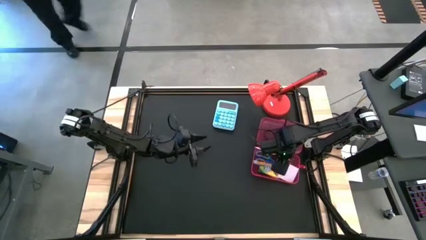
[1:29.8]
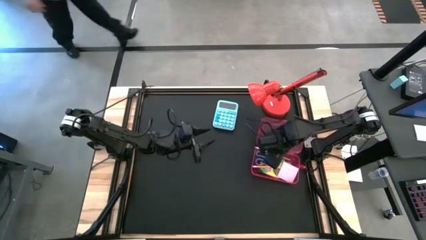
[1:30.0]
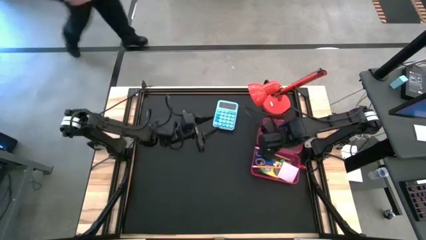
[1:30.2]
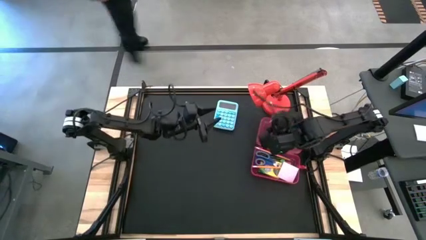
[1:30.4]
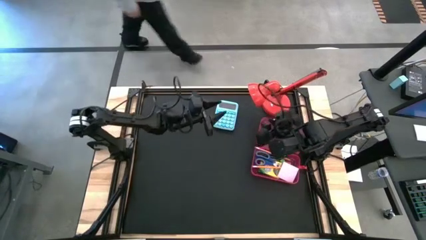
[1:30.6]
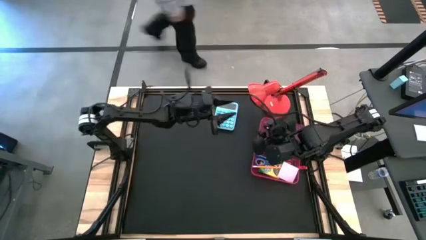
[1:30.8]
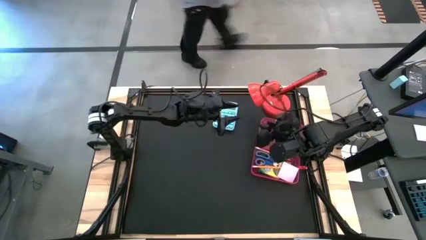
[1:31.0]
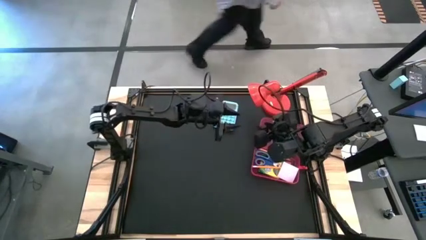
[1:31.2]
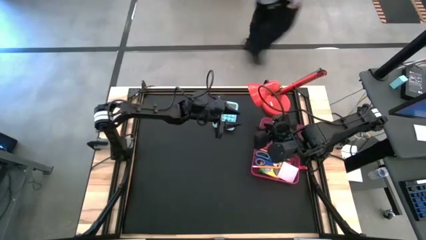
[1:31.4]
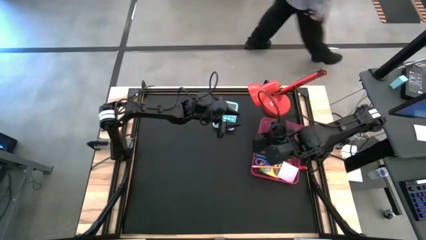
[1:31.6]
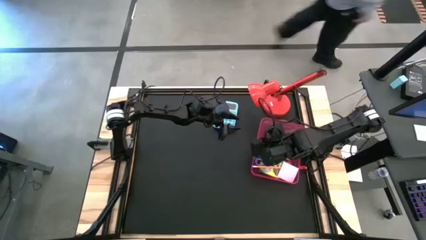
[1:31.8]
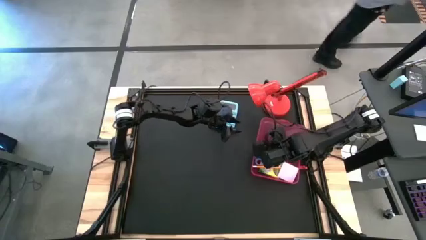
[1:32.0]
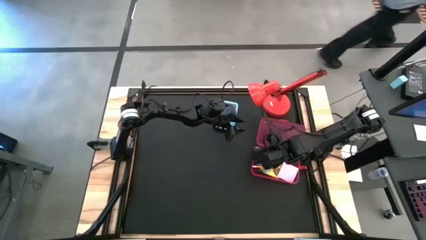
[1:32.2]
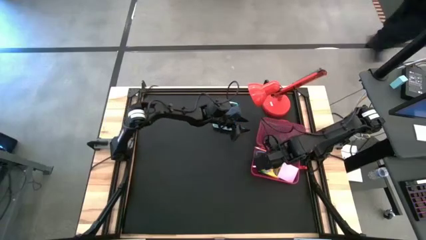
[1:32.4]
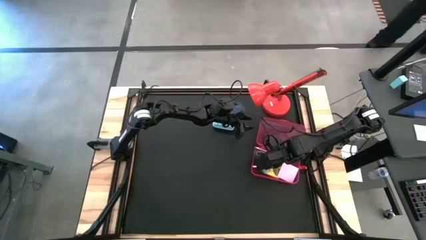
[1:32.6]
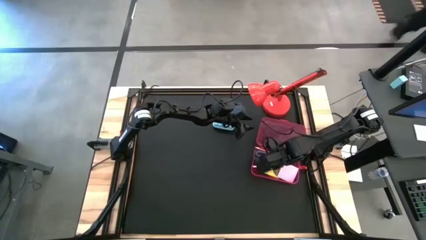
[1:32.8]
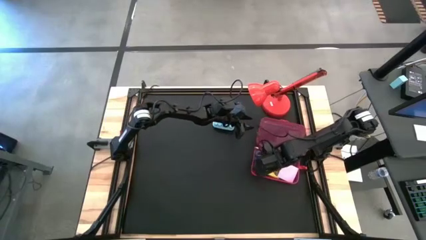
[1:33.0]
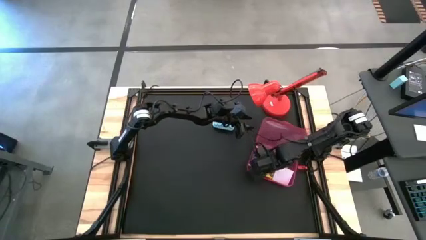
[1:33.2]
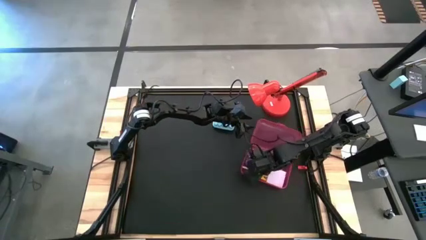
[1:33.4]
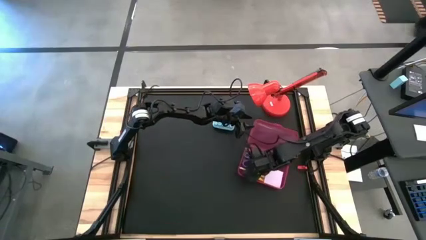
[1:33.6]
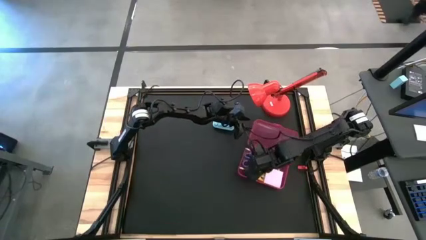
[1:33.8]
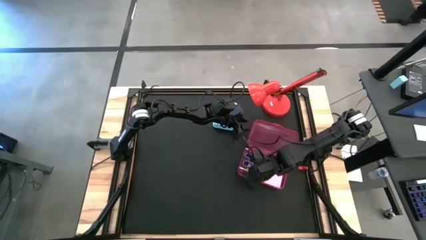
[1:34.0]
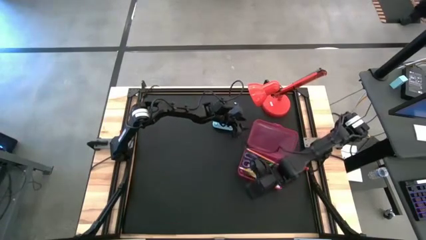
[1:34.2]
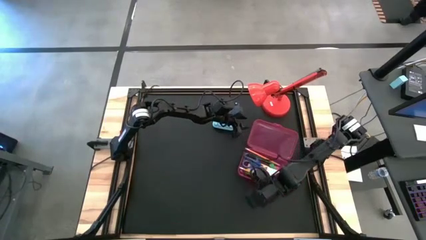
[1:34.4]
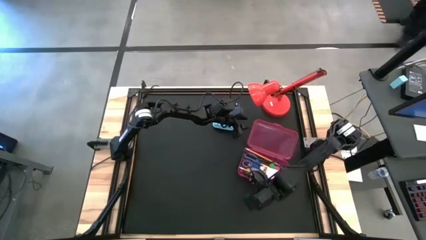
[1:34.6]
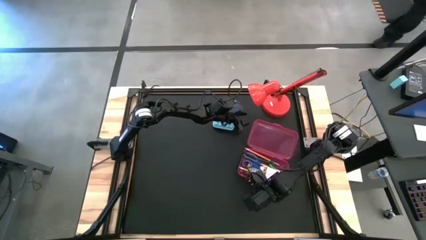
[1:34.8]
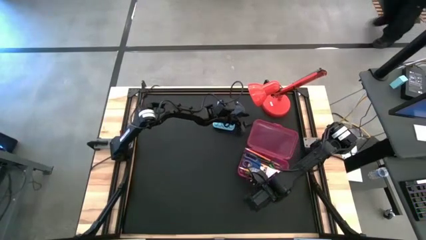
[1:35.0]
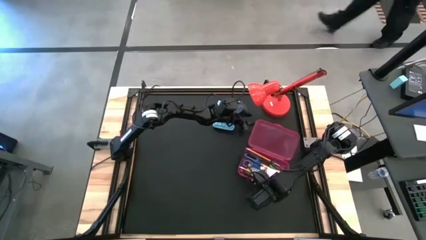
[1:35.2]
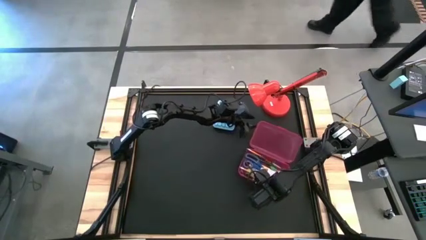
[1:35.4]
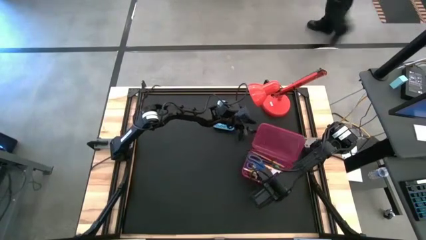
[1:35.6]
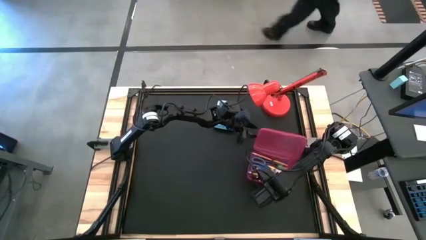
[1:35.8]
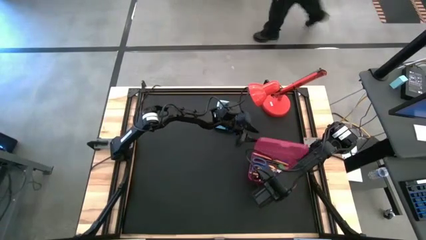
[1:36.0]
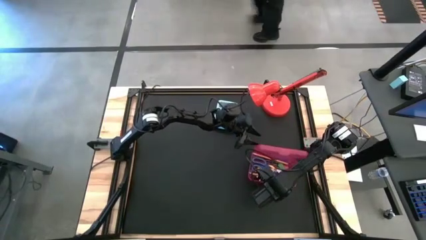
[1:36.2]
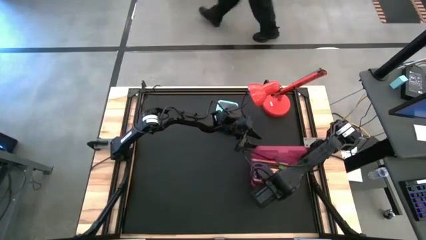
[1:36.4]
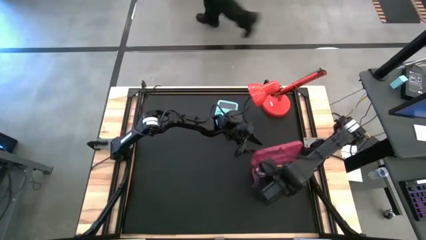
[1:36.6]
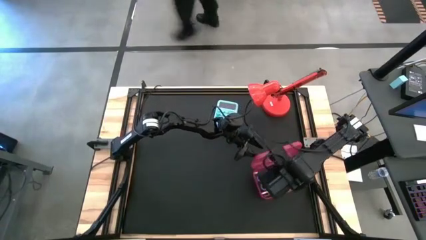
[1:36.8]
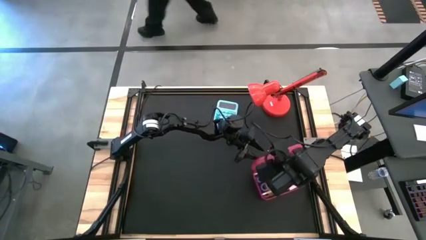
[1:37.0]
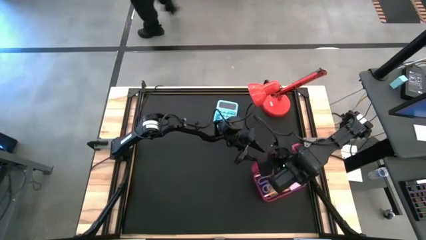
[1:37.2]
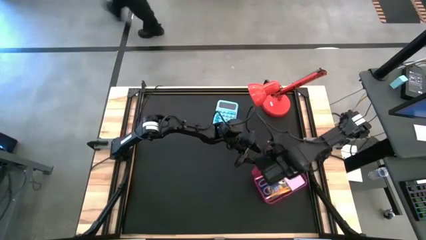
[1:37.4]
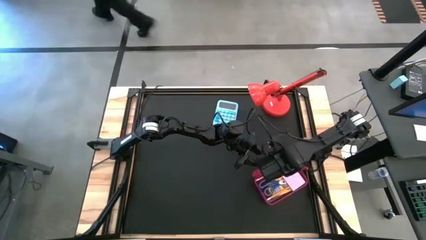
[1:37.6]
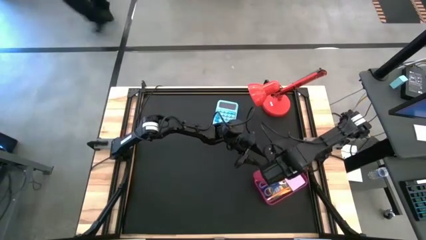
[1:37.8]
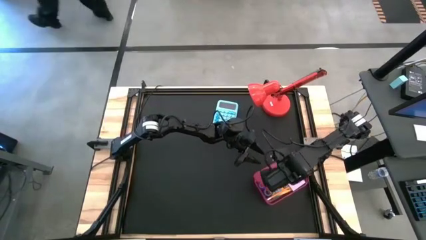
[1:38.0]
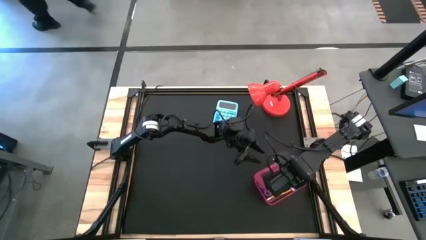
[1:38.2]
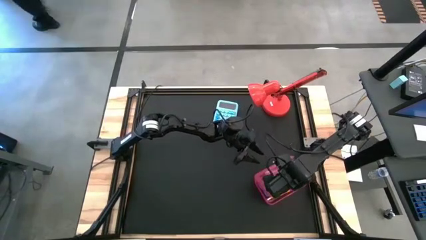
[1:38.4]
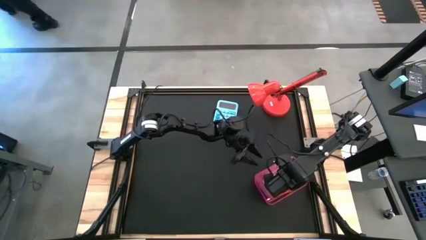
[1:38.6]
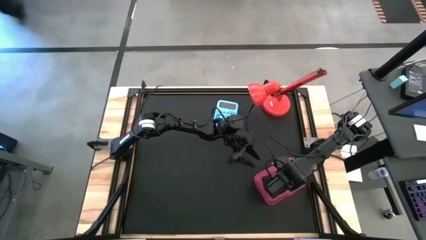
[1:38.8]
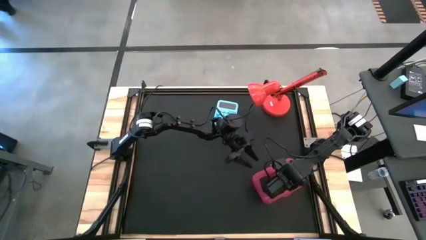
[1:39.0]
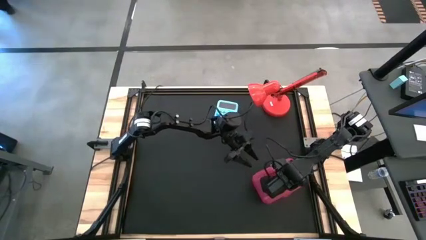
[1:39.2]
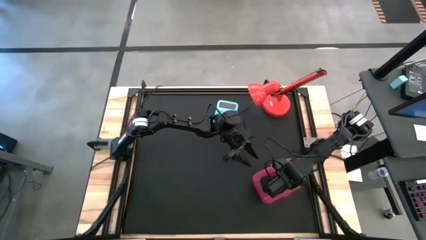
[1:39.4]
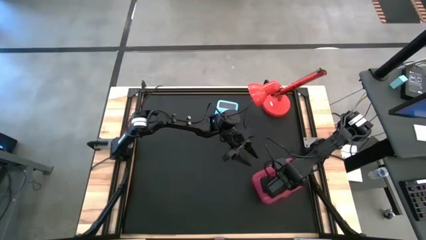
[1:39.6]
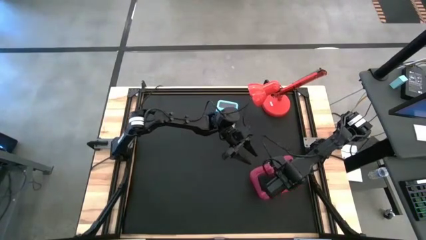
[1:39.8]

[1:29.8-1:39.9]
Task: Pack school essentials
Close the red supply box
